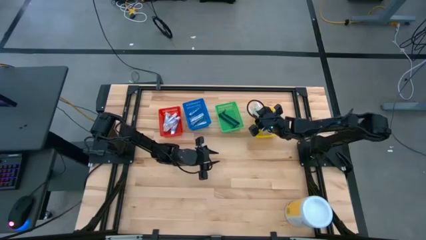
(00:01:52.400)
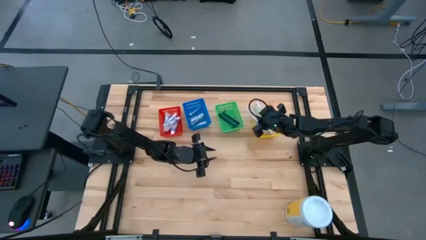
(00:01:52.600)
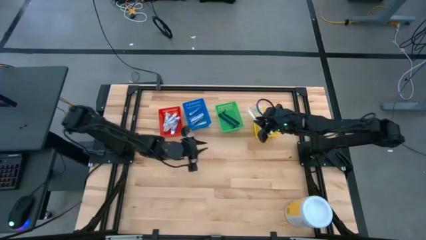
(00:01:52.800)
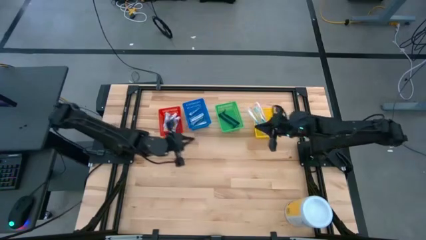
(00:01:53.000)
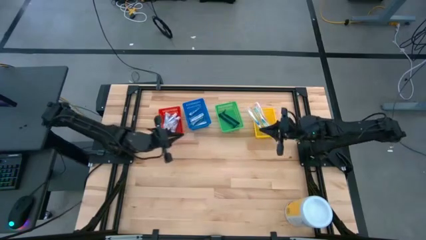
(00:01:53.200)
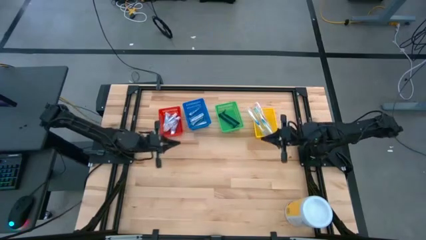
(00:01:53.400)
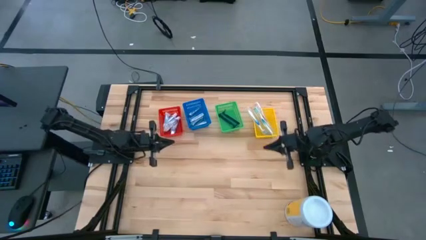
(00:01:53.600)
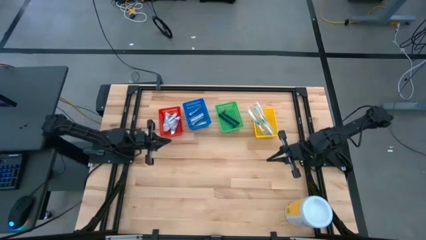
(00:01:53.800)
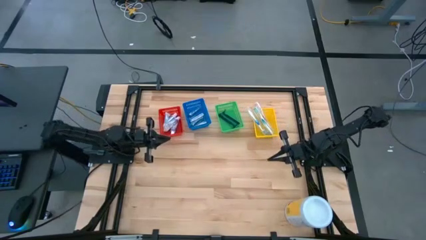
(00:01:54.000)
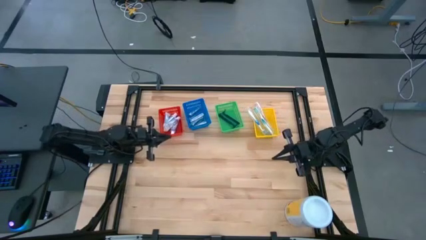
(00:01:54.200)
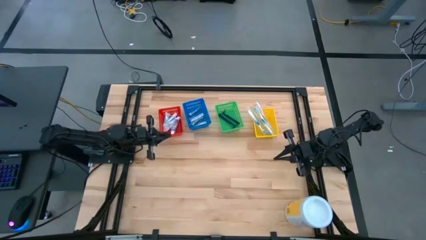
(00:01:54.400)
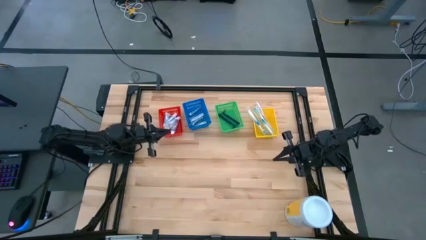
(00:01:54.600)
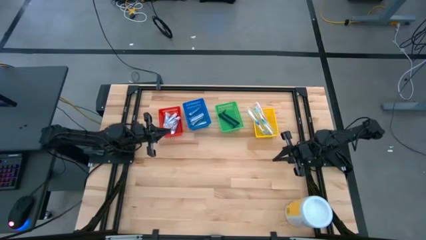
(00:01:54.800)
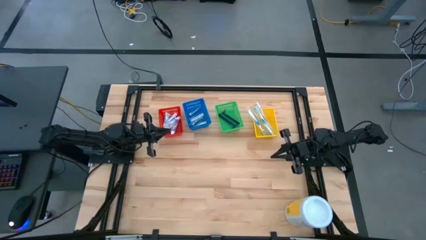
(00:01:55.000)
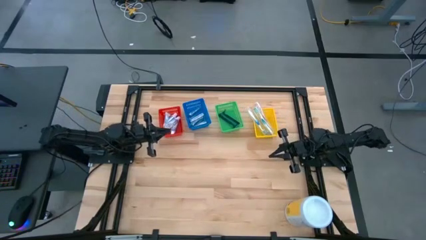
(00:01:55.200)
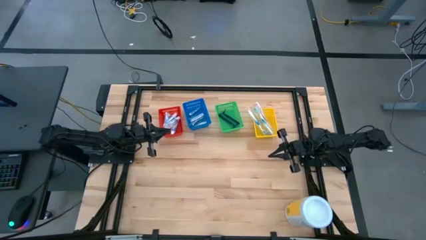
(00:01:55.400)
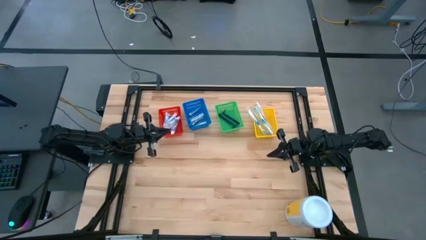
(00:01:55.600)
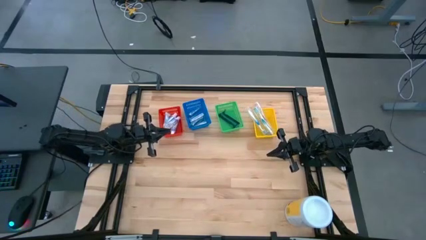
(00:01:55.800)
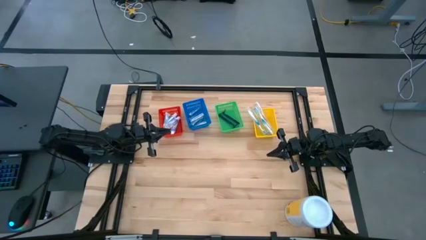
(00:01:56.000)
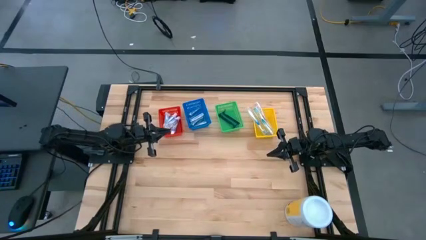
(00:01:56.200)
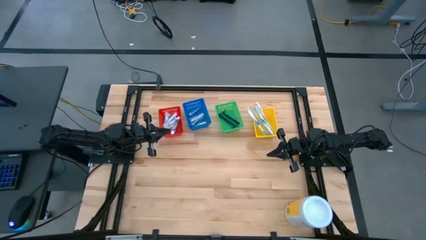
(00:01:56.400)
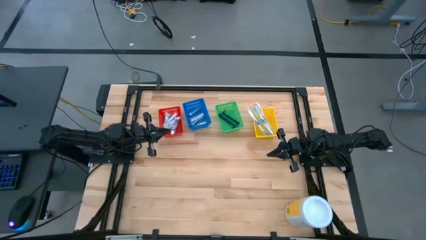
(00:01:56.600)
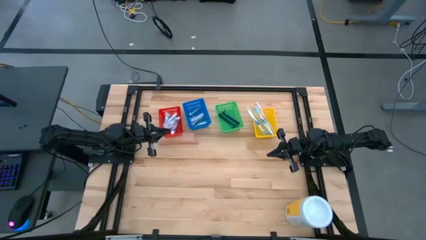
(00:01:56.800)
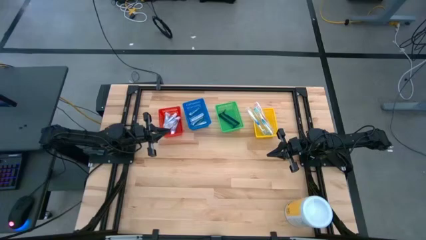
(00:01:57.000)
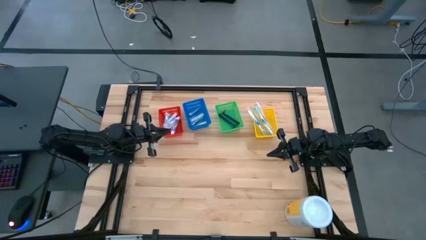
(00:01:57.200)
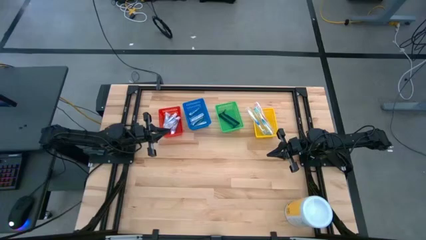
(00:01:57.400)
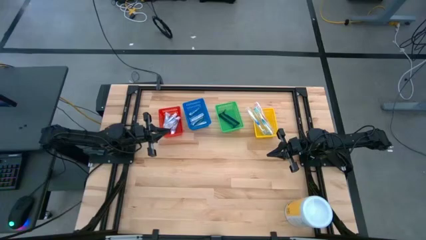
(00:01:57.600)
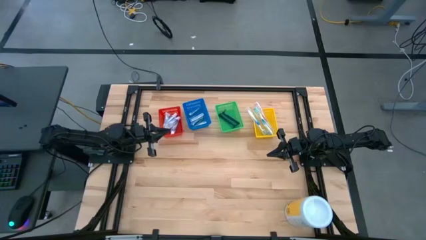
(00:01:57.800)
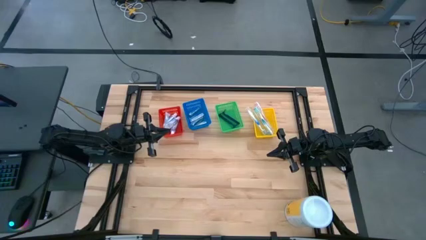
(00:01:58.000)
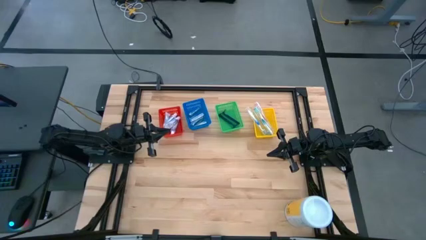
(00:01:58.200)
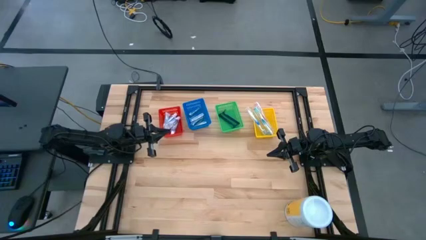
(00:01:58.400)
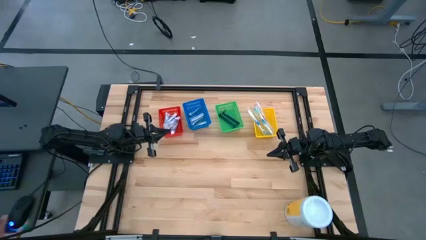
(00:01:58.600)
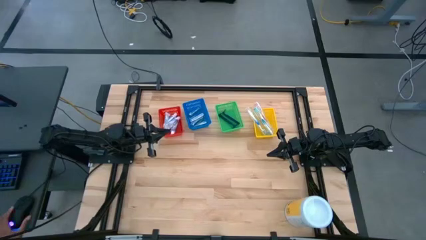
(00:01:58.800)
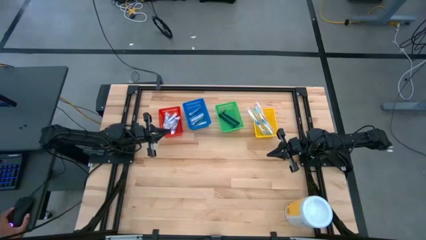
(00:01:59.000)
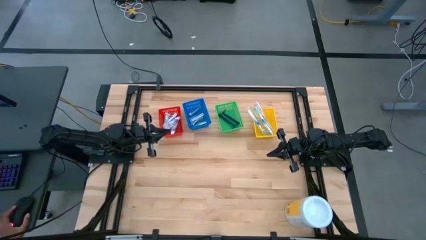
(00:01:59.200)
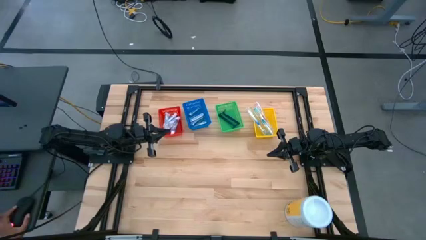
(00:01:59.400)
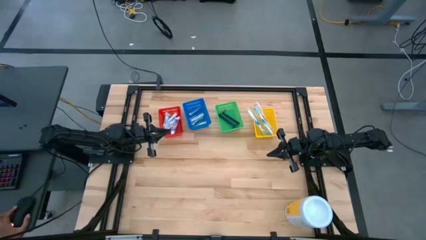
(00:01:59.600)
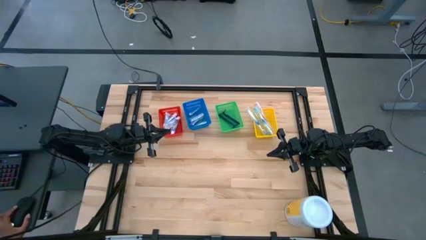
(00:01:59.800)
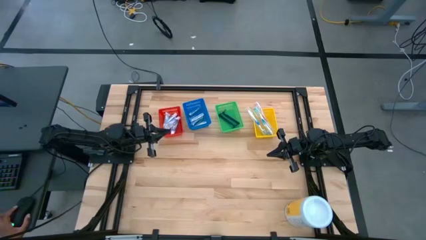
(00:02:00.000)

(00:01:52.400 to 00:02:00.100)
Task: Pick & Place Travel size toiletries
Return to Home Position

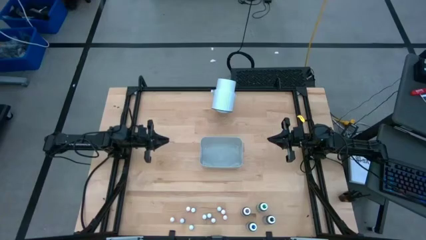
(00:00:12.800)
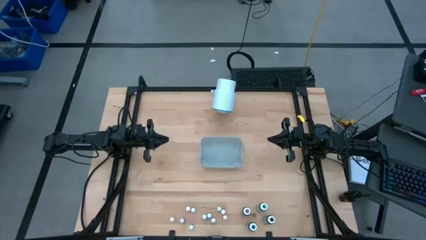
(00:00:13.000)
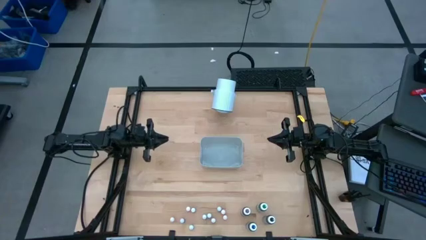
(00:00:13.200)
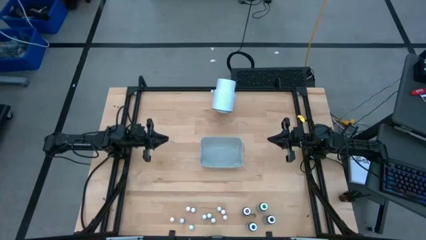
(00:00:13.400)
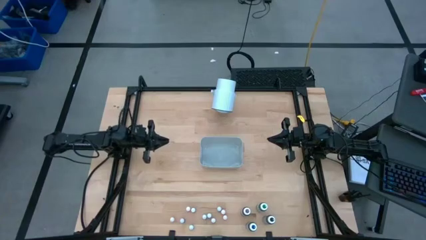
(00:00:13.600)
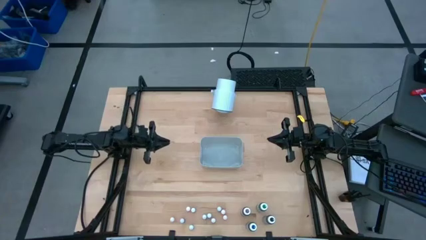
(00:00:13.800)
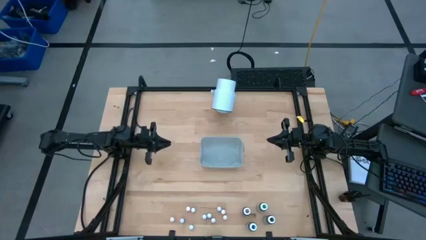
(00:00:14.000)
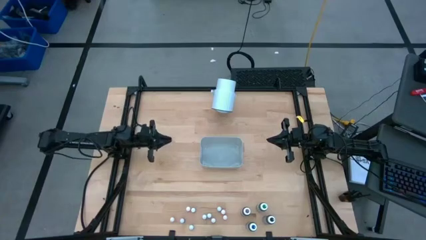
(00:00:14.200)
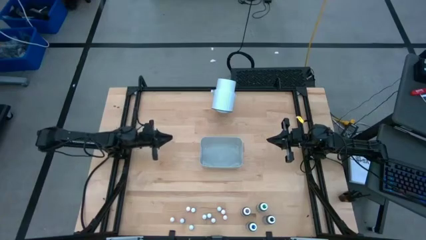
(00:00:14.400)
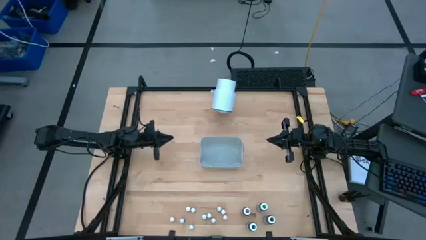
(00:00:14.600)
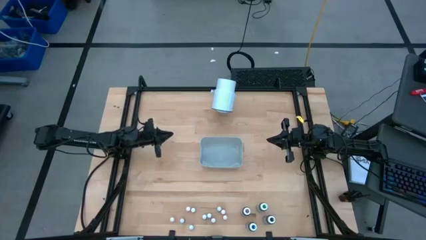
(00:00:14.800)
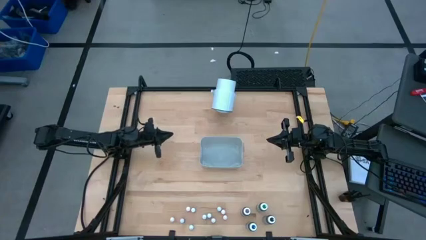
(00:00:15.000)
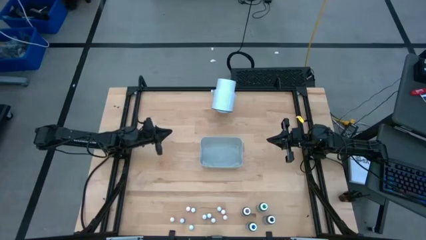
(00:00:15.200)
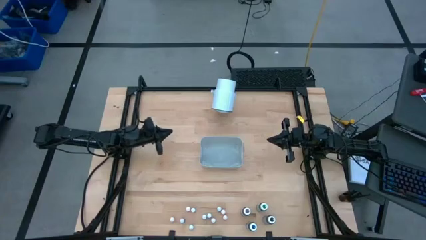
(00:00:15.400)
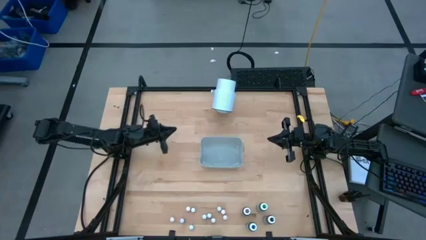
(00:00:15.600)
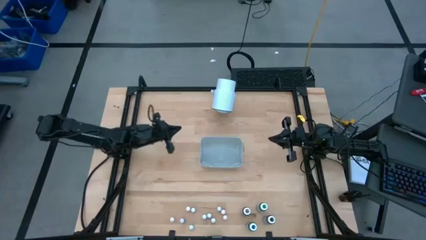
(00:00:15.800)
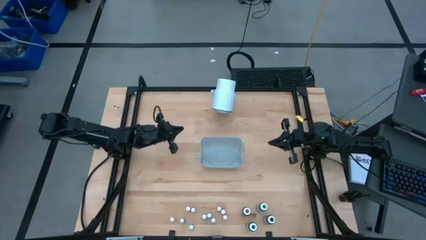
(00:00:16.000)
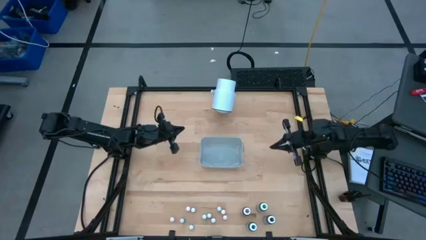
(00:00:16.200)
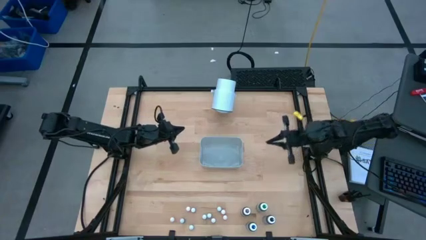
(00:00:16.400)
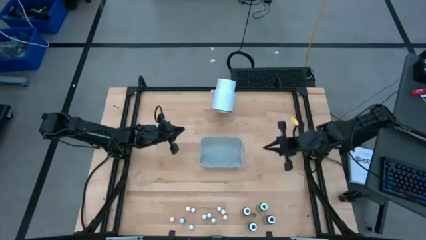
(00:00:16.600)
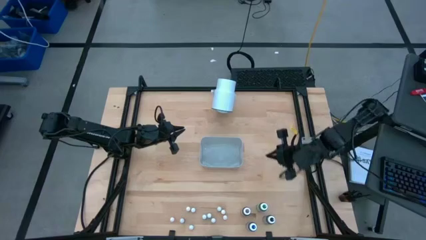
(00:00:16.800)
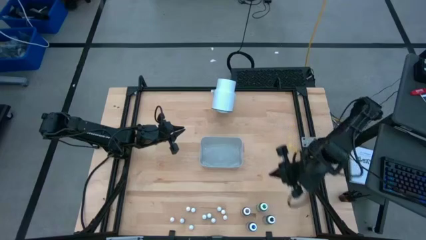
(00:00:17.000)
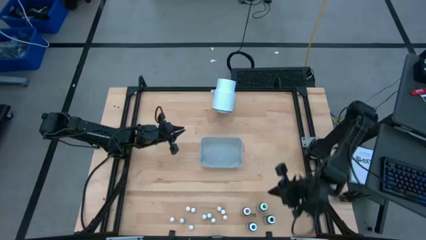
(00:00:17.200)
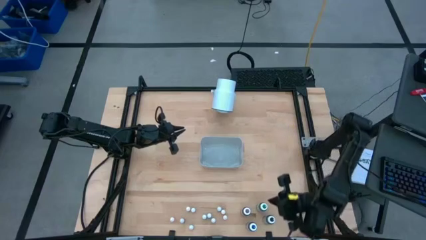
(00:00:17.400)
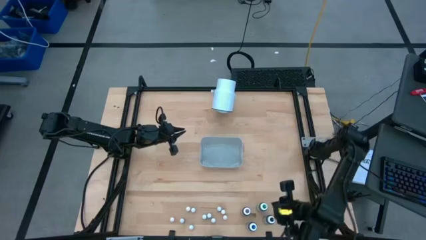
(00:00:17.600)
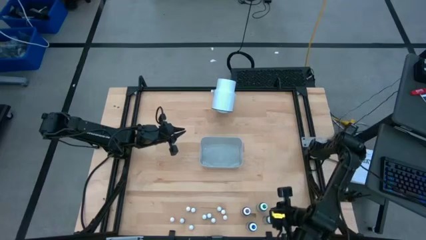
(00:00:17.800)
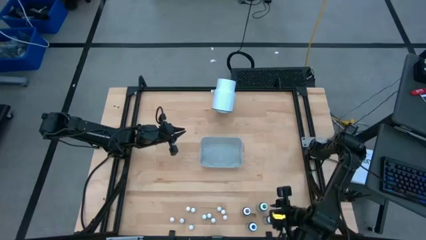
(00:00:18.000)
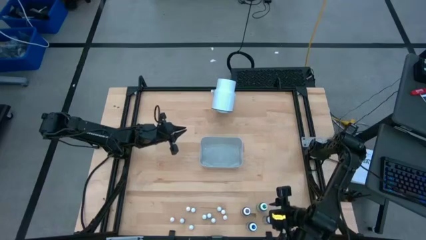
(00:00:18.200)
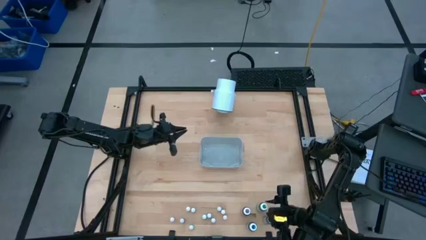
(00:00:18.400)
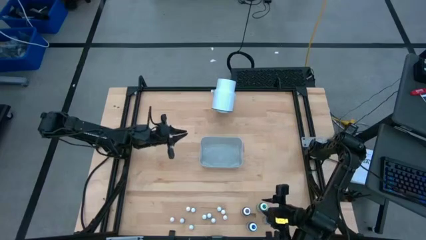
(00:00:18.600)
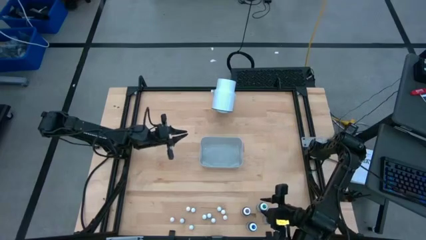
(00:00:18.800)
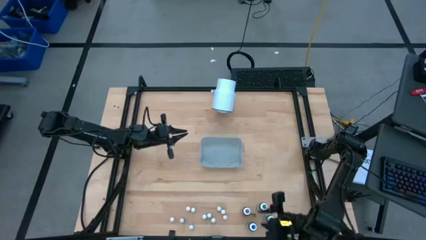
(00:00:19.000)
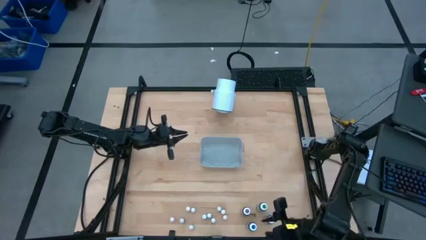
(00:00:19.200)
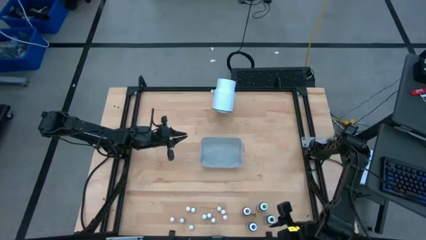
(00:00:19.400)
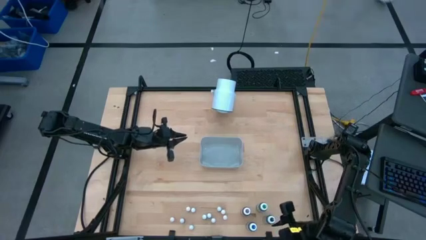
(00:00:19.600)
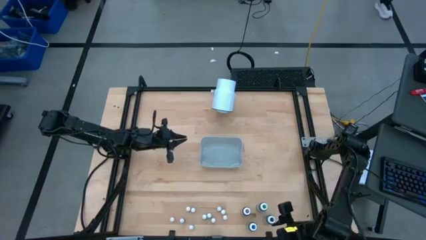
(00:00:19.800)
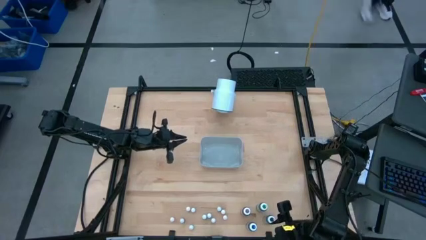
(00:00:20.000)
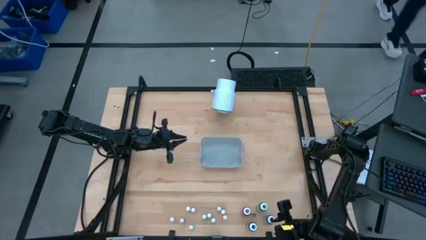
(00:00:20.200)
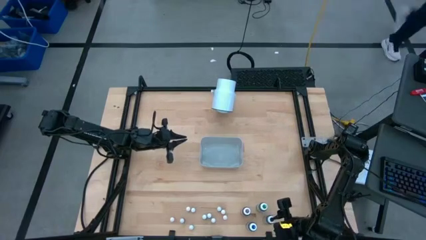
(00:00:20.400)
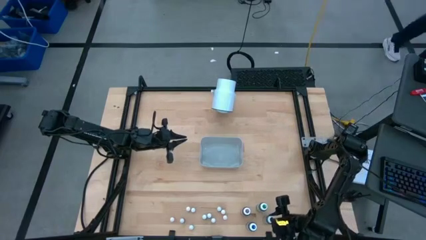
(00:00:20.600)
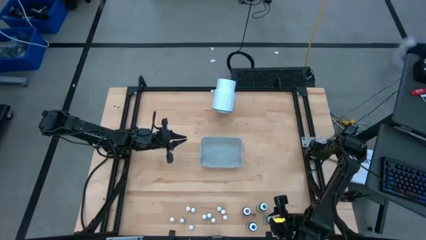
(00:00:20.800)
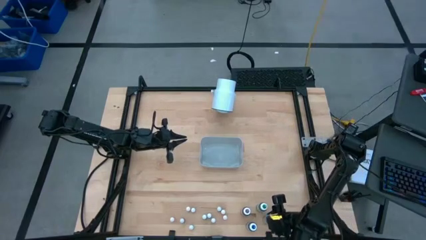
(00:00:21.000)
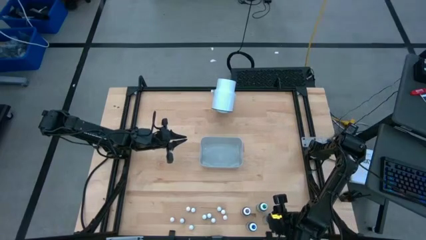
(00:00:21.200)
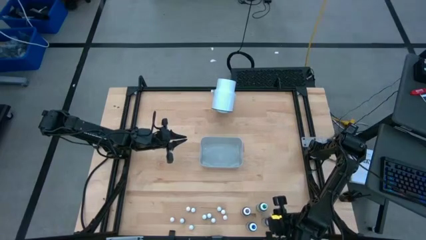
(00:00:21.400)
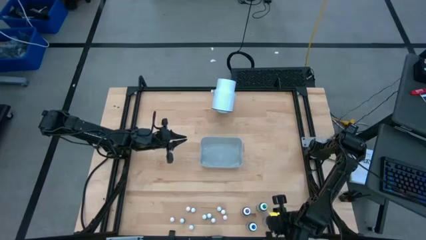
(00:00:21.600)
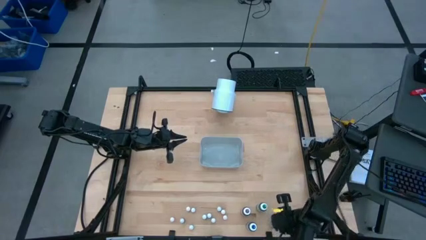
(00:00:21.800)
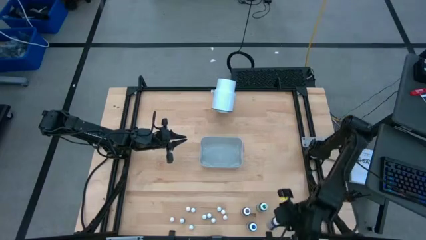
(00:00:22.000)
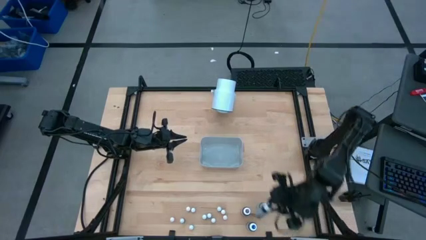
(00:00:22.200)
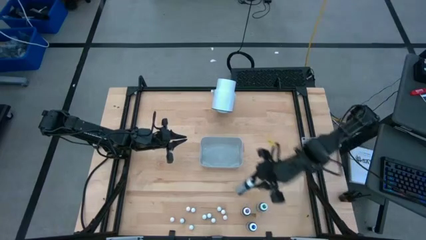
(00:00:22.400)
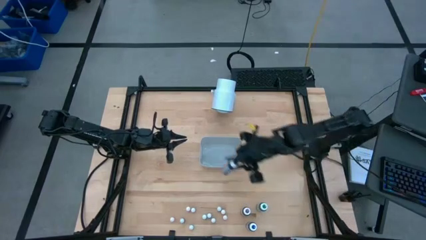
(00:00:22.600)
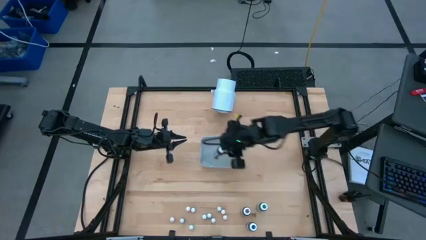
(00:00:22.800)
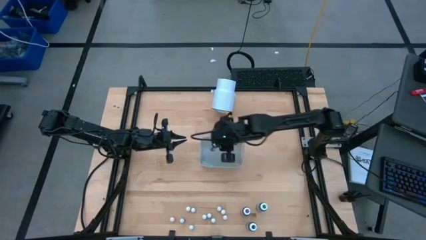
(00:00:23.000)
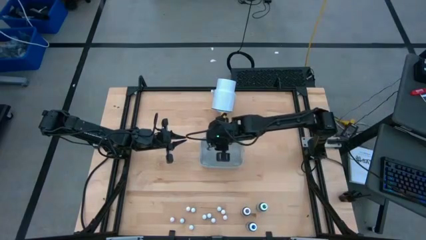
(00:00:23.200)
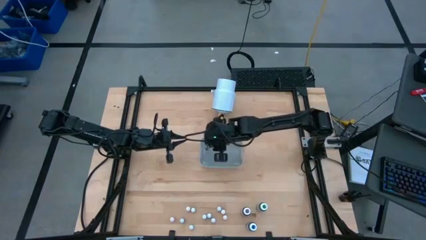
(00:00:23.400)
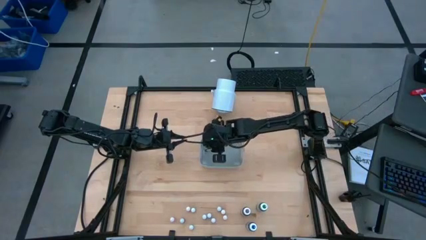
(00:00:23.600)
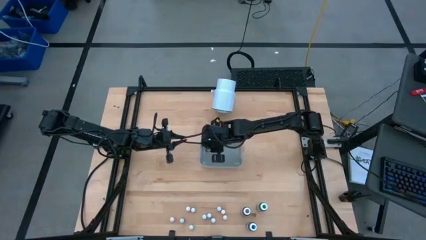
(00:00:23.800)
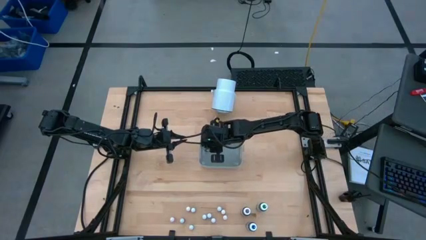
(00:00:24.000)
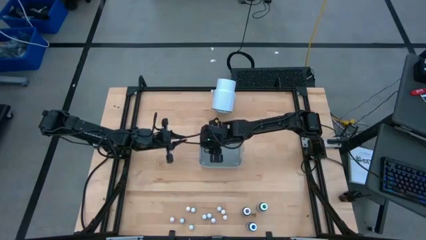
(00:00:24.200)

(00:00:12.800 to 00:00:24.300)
Task: Pick & Place food coloring
Put the large black food coloring bottle into the gray bin
